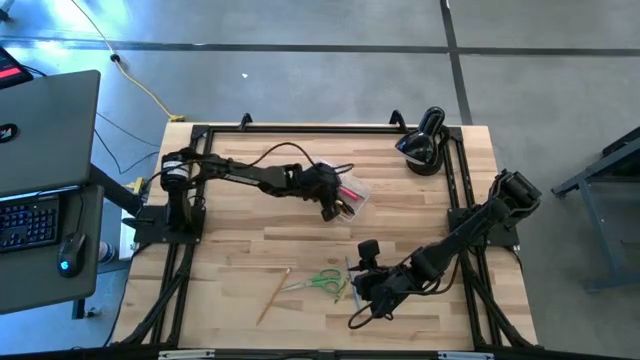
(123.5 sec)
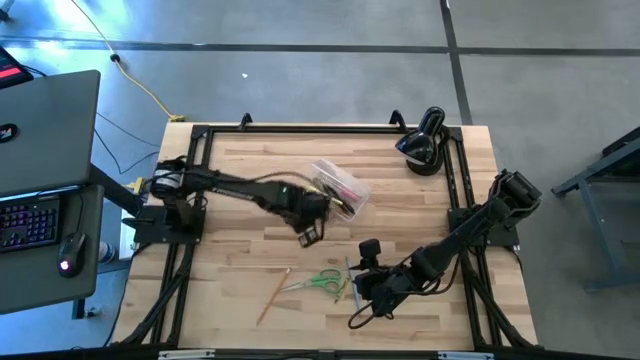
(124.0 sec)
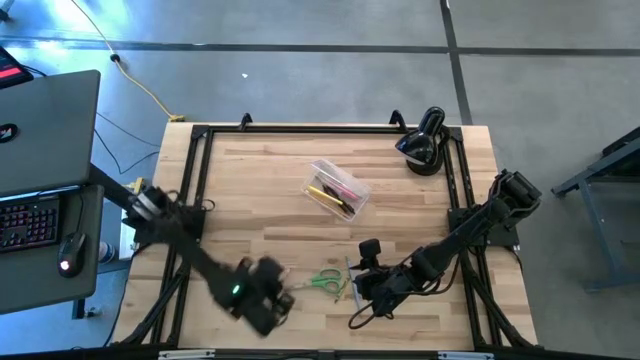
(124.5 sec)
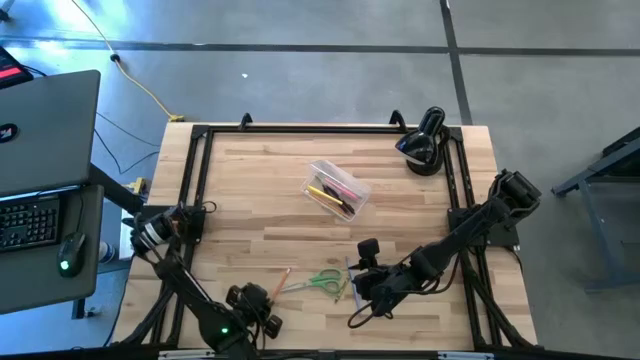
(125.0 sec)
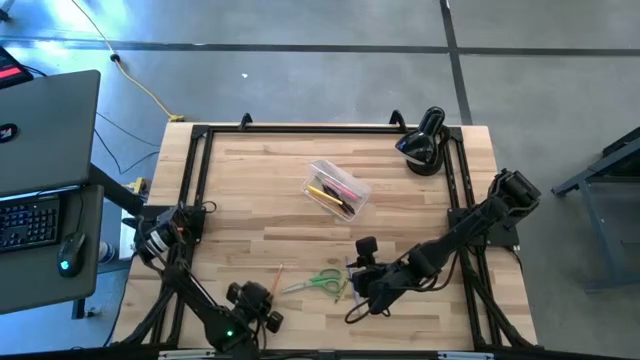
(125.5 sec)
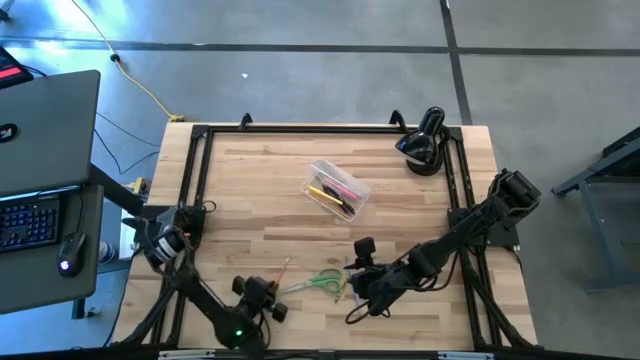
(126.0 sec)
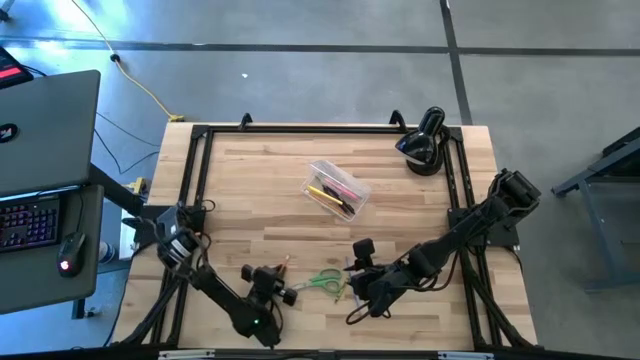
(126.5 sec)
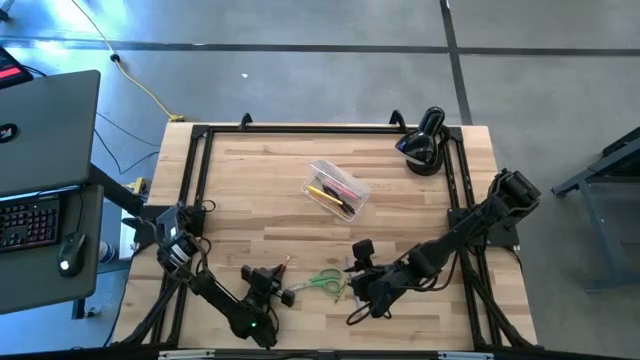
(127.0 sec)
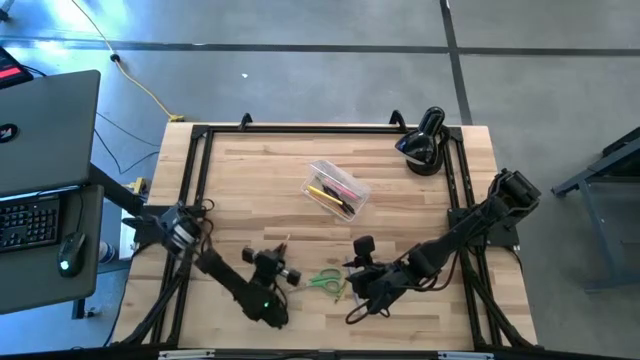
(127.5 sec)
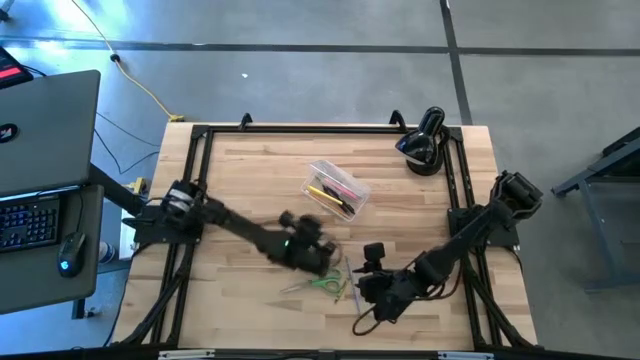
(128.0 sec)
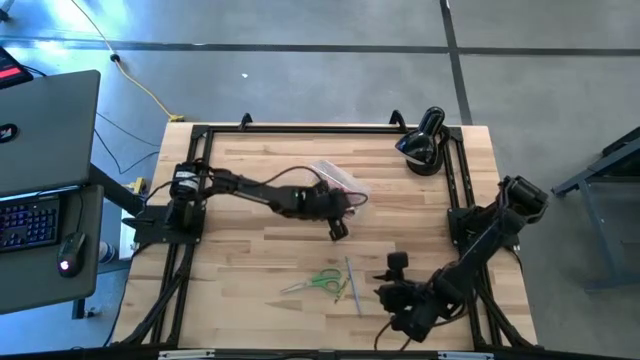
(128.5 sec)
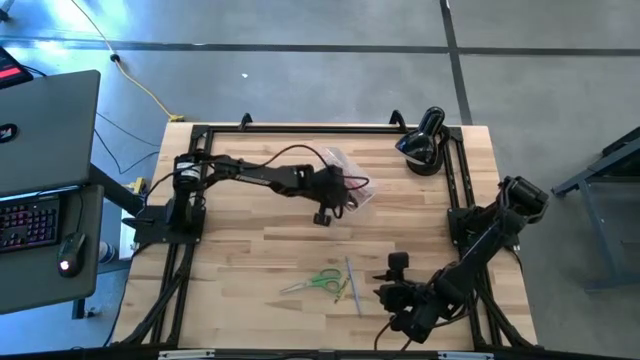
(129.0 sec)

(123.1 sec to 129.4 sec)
Task: Pick & place school supplies into a supply box
Put the yellow pencil into the supply box

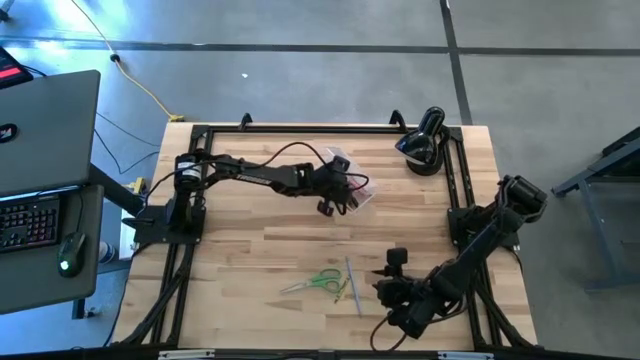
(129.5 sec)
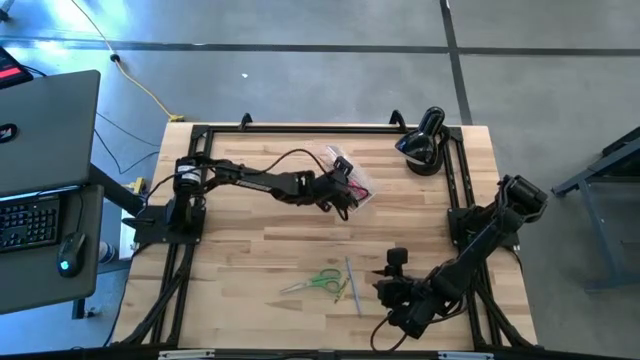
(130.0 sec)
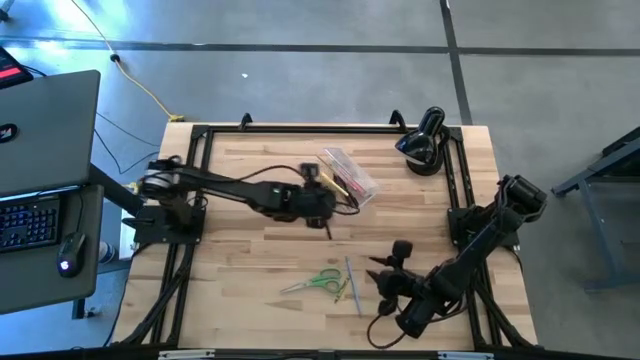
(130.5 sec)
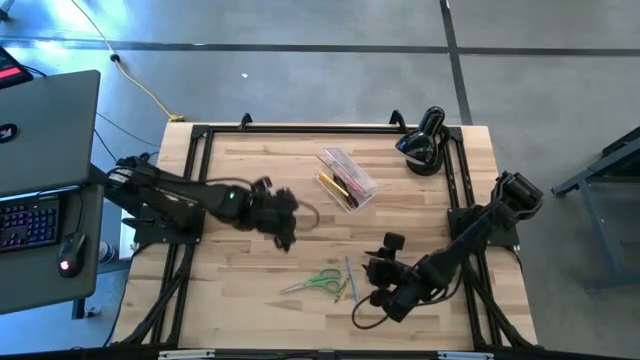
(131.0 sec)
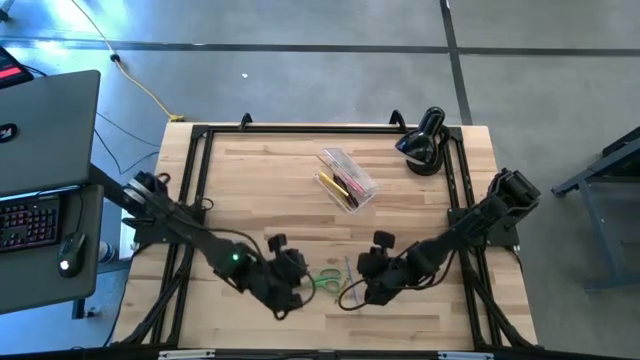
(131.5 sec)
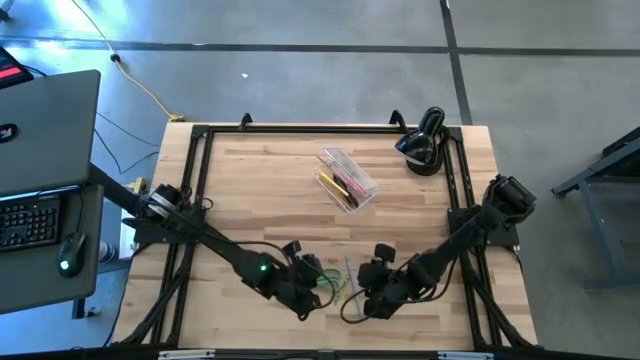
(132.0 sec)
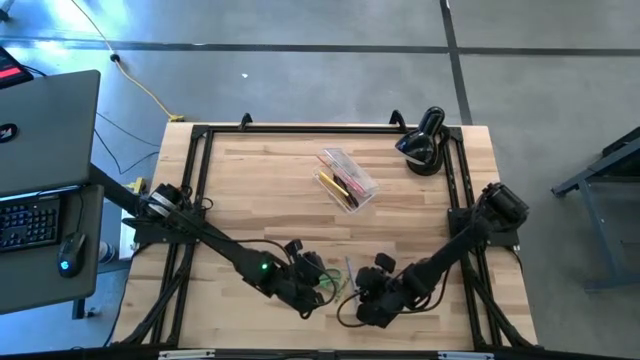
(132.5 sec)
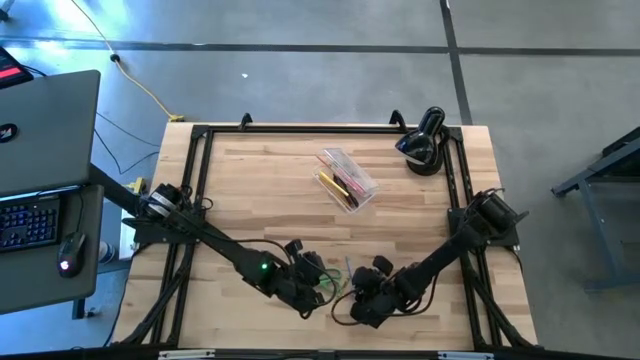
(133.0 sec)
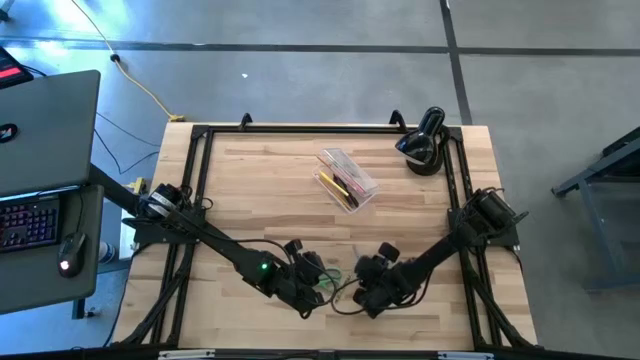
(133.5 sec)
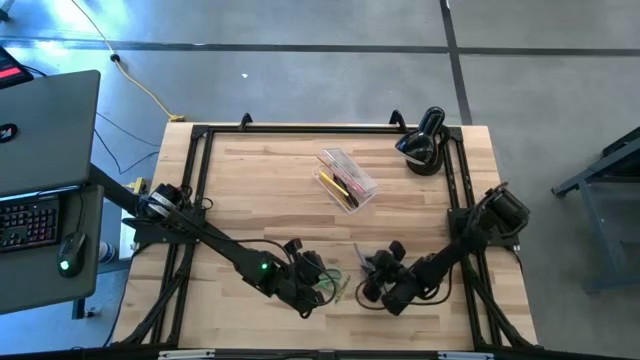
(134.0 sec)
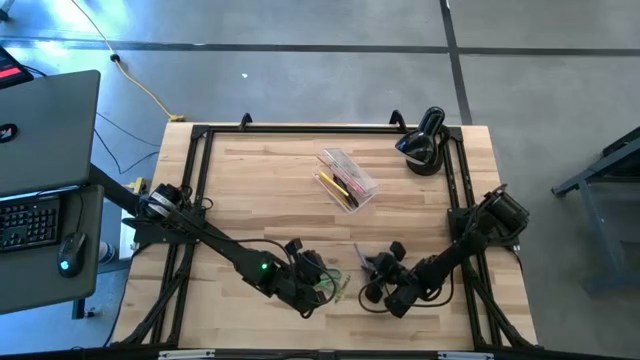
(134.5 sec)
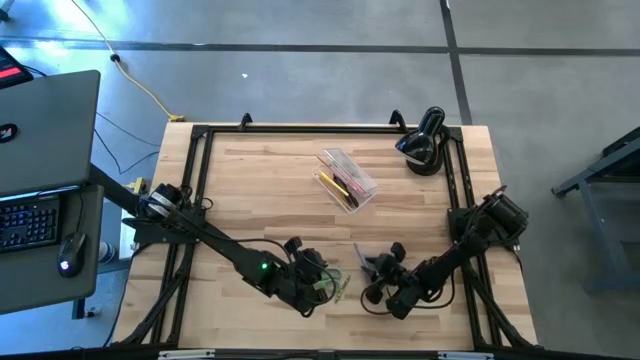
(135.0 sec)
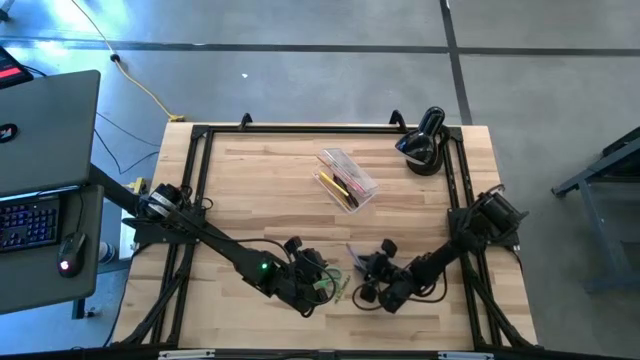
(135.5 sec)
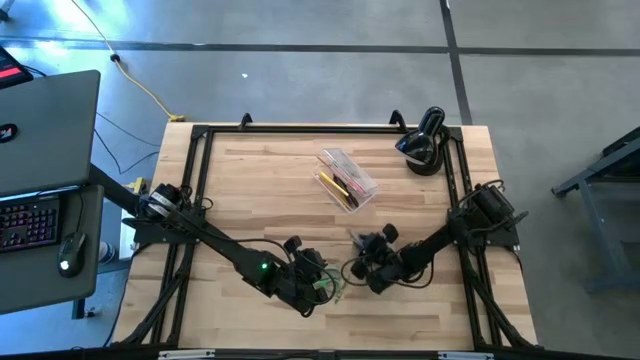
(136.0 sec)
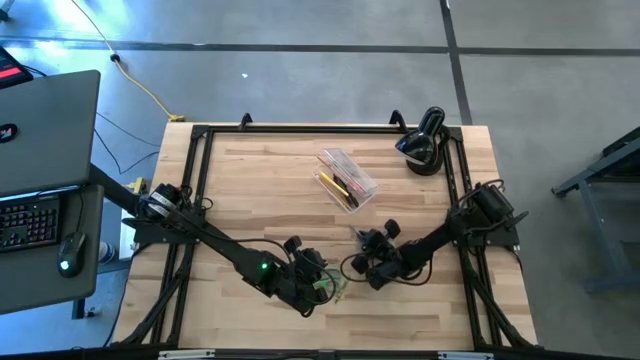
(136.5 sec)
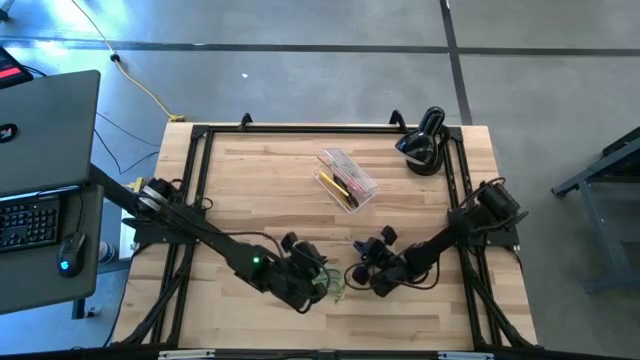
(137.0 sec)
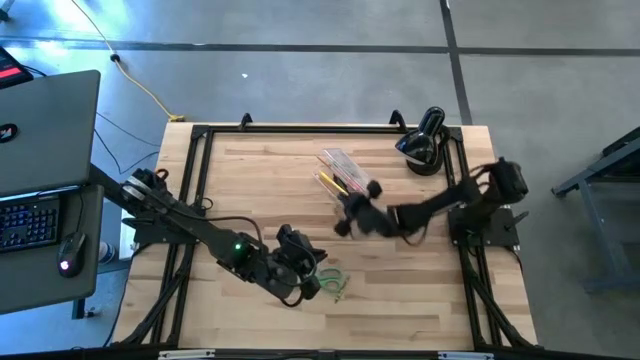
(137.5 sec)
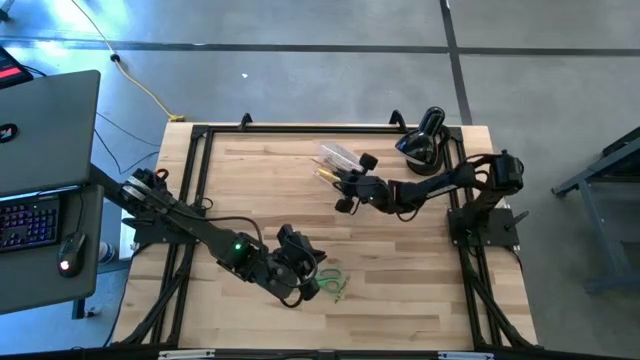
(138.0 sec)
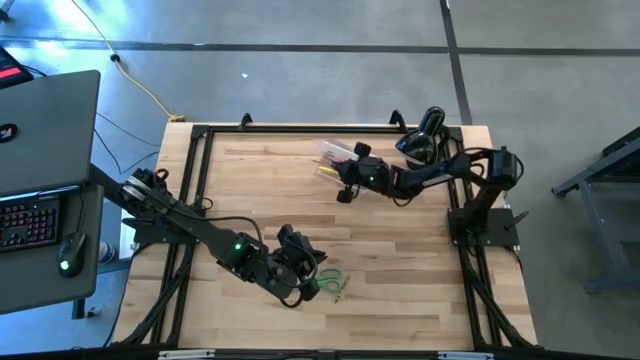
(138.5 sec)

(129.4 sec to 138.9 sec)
Put the blue pencil into the supply box

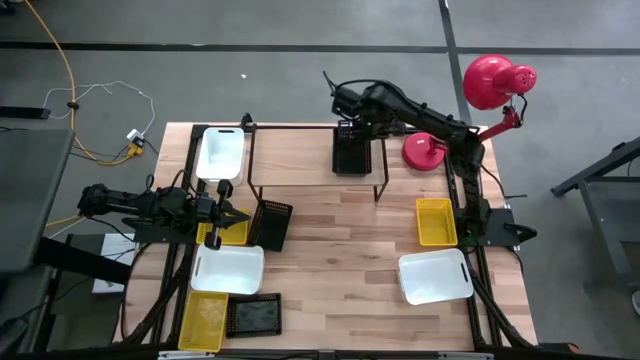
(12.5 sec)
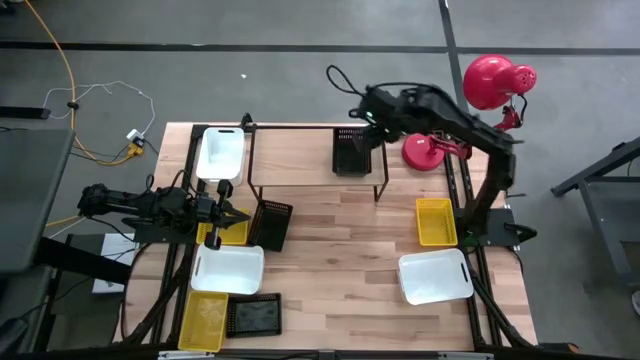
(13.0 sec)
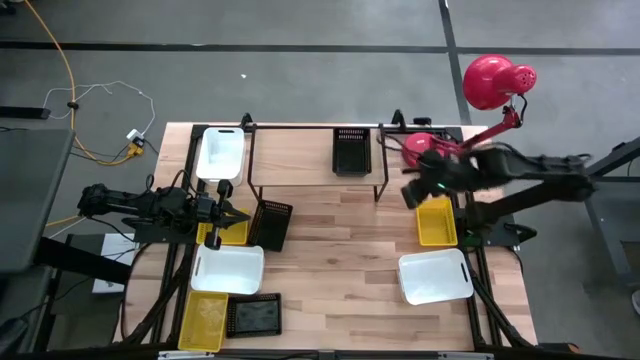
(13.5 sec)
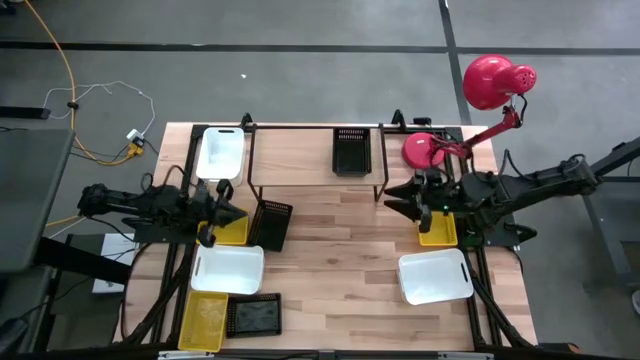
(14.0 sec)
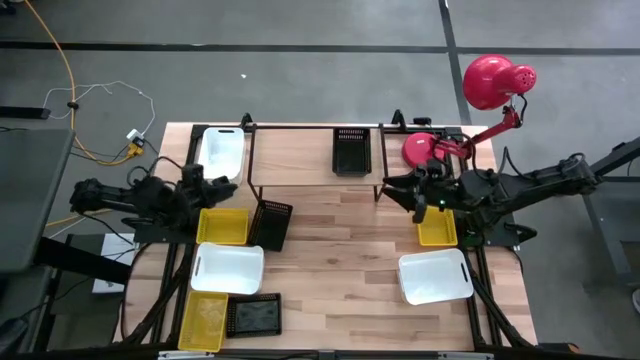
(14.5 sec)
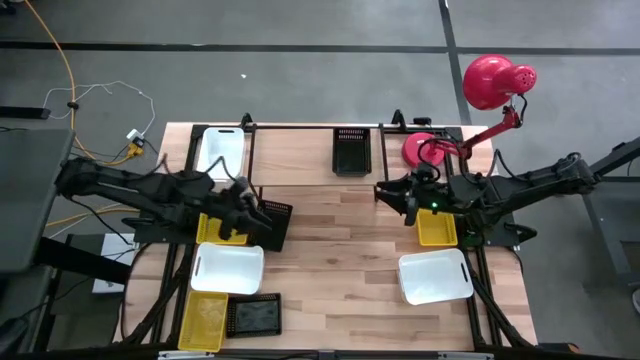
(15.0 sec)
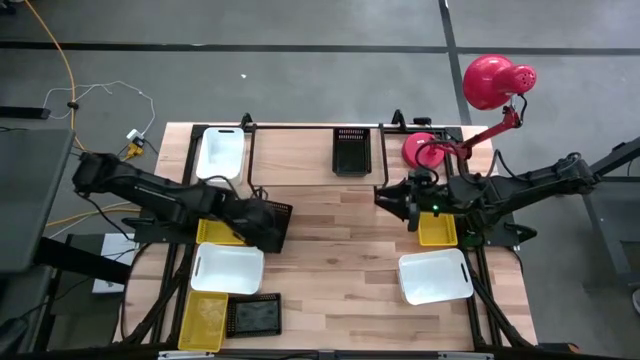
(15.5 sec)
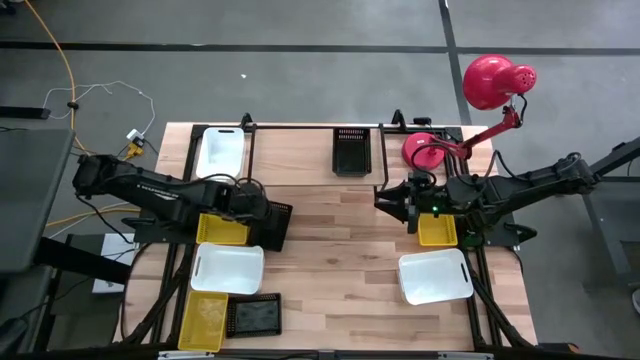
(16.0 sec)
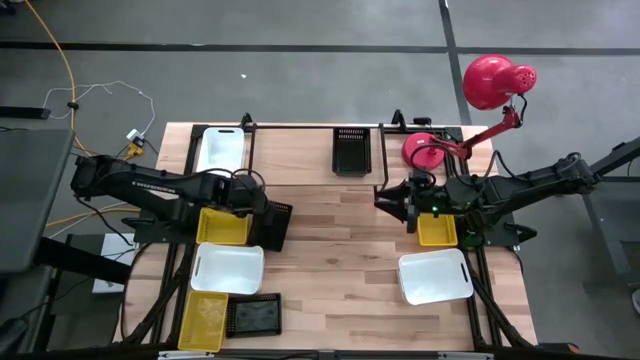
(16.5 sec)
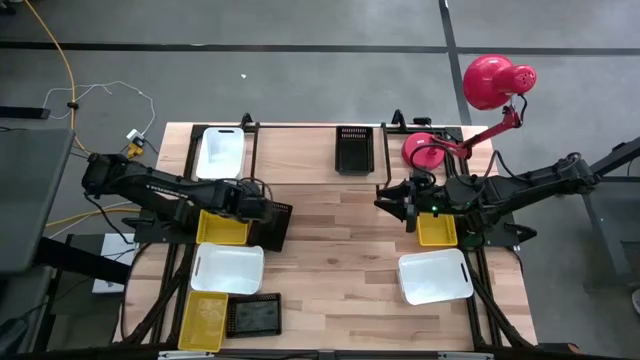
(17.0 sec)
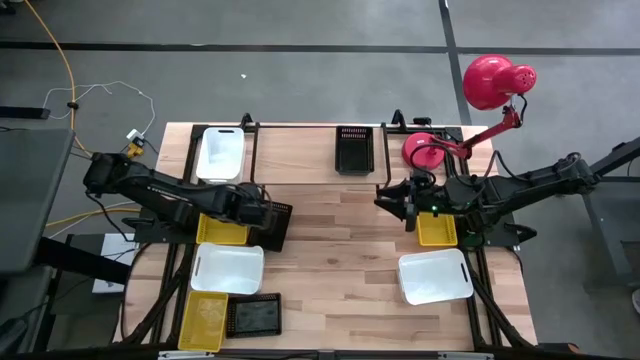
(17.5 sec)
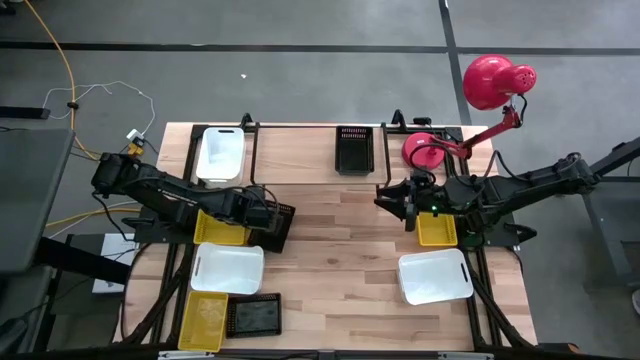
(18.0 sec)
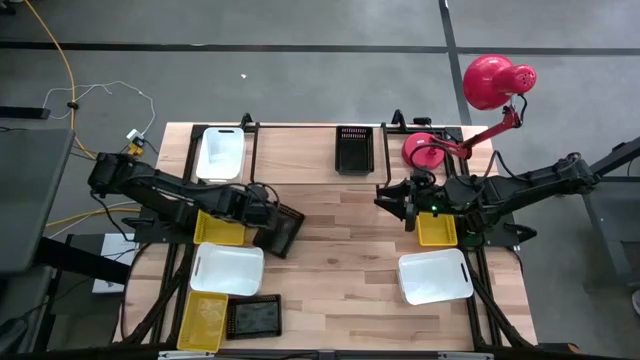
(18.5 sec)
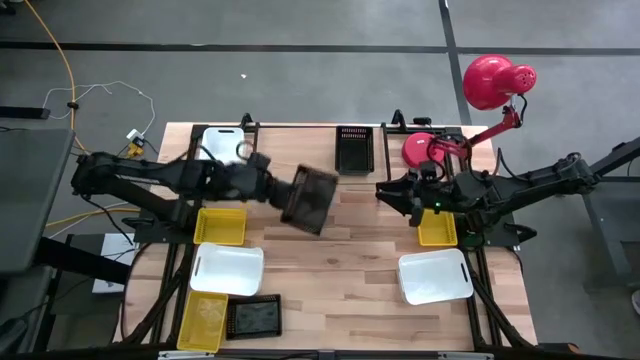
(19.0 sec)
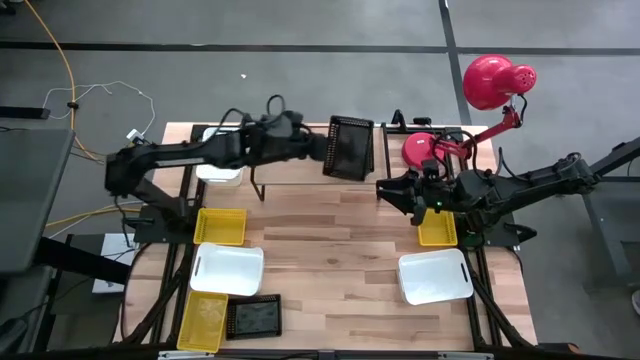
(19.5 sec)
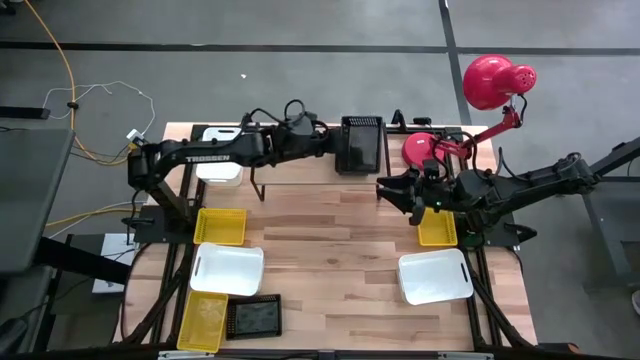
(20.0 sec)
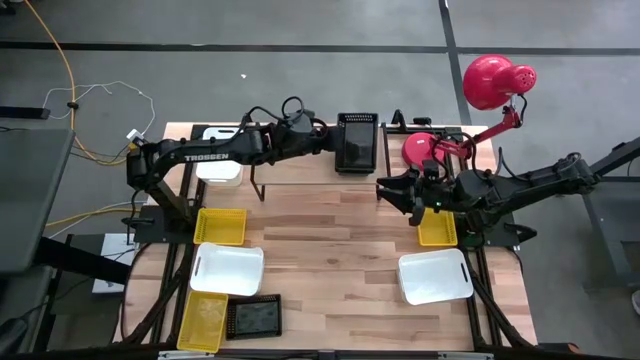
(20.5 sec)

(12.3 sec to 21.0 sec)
Task: Stack baskets on shelf by color
Stack the top black bin into the black bin on the shelf
